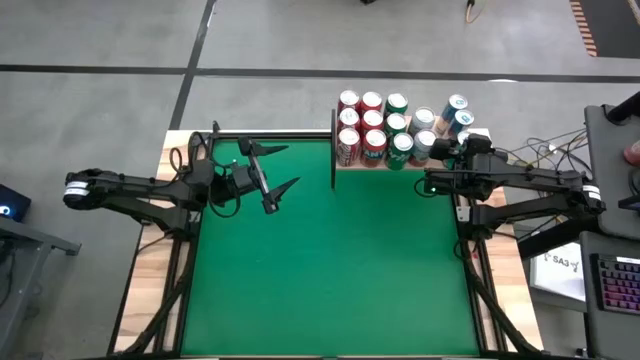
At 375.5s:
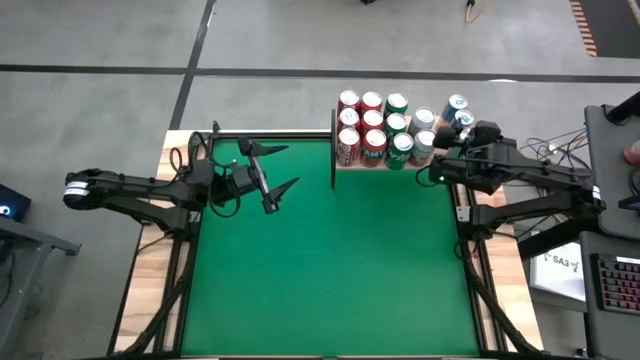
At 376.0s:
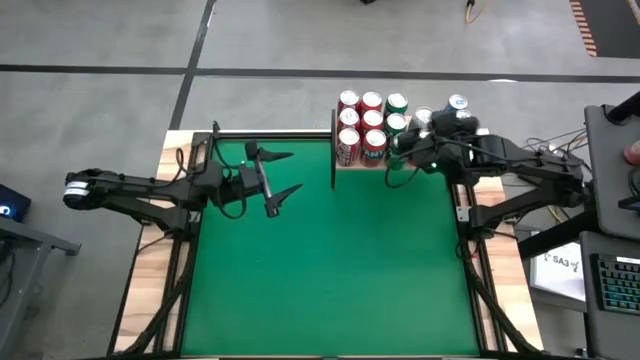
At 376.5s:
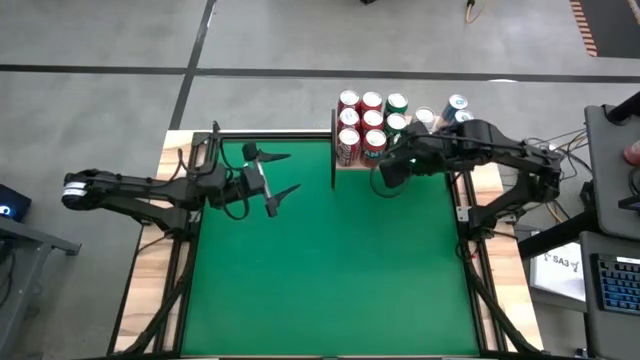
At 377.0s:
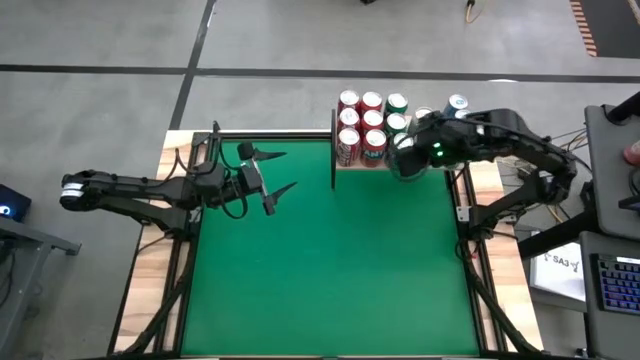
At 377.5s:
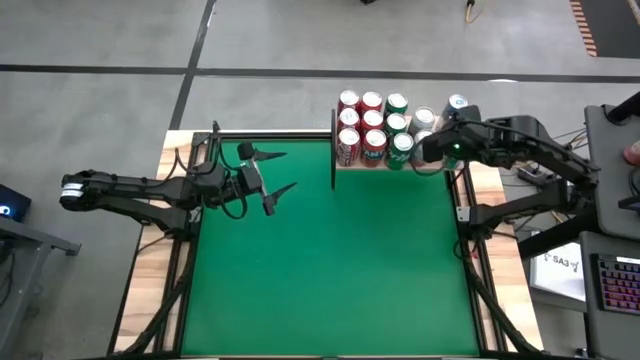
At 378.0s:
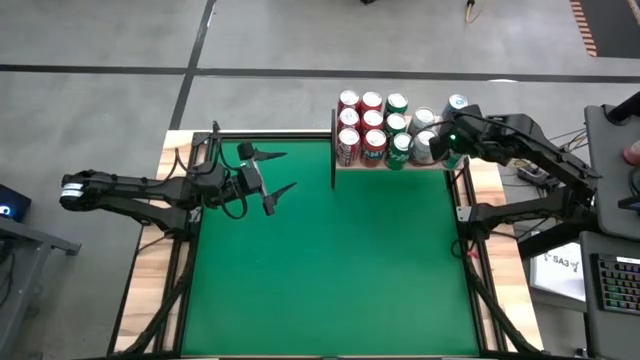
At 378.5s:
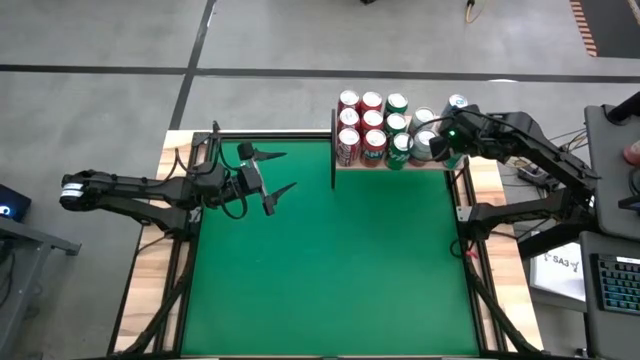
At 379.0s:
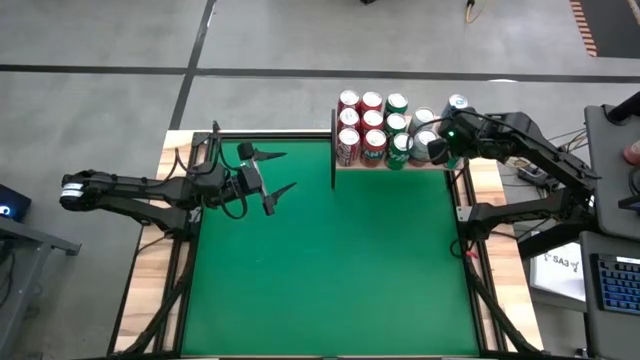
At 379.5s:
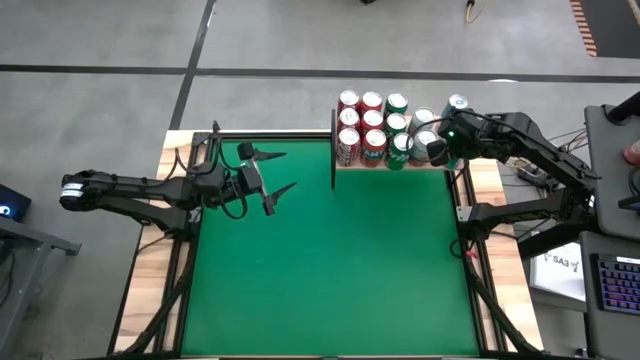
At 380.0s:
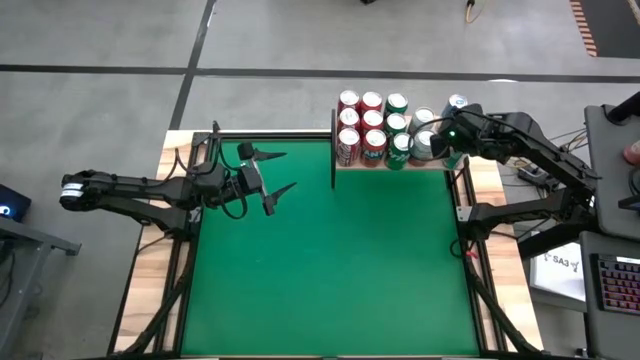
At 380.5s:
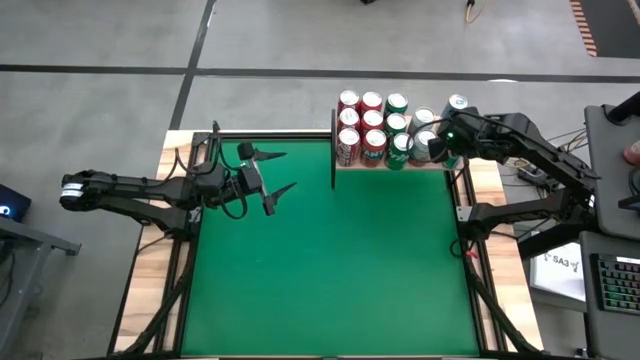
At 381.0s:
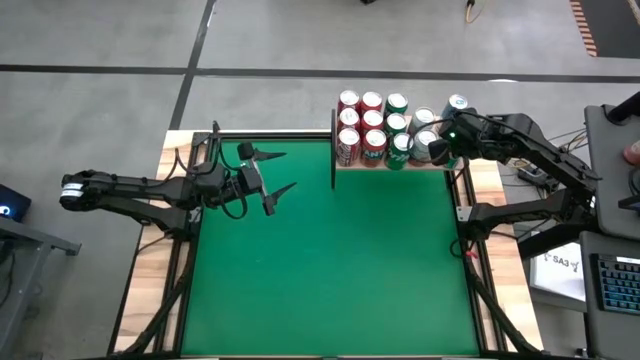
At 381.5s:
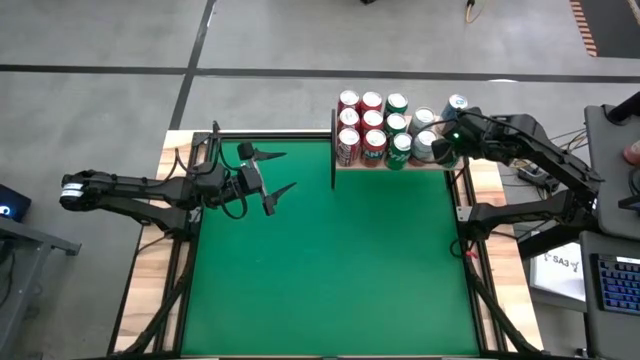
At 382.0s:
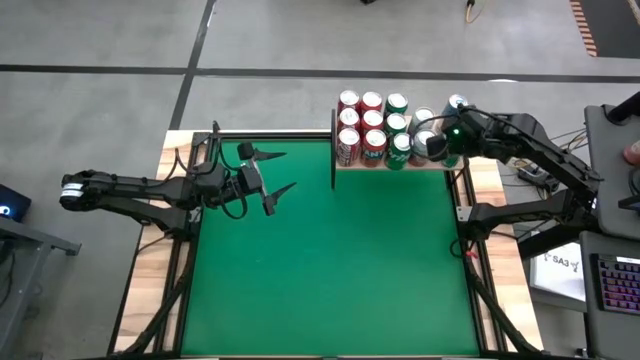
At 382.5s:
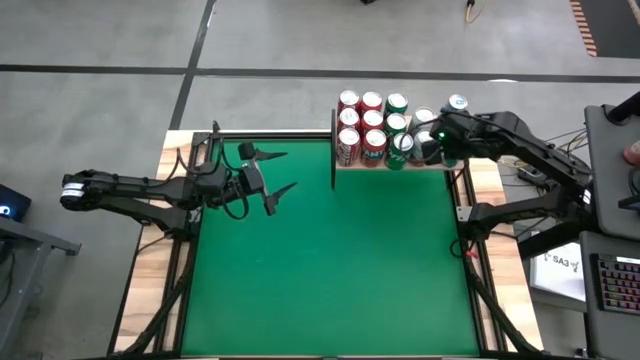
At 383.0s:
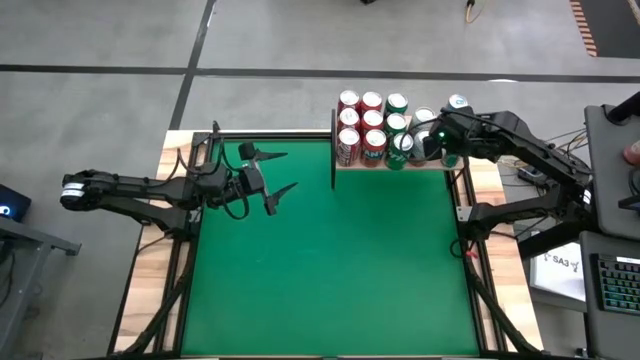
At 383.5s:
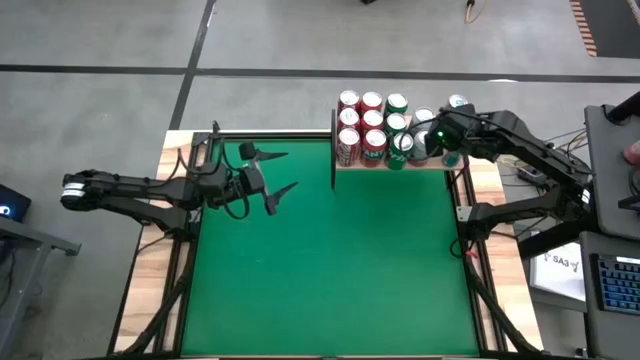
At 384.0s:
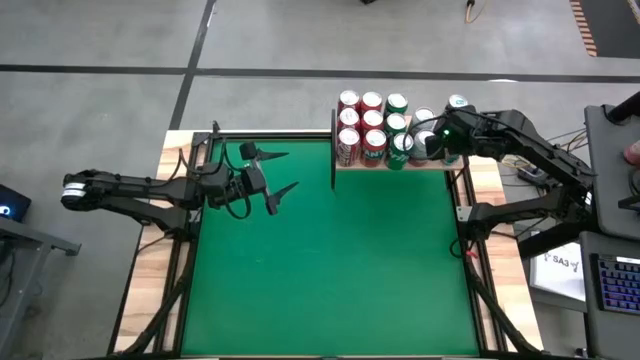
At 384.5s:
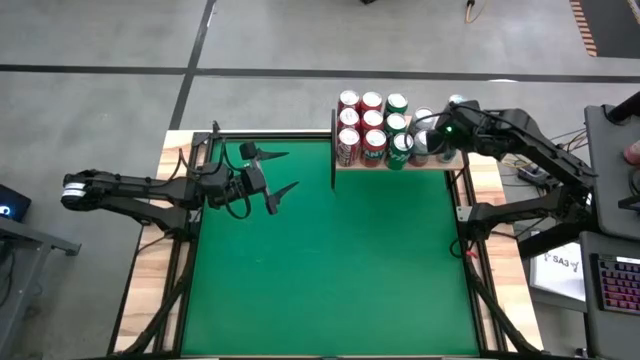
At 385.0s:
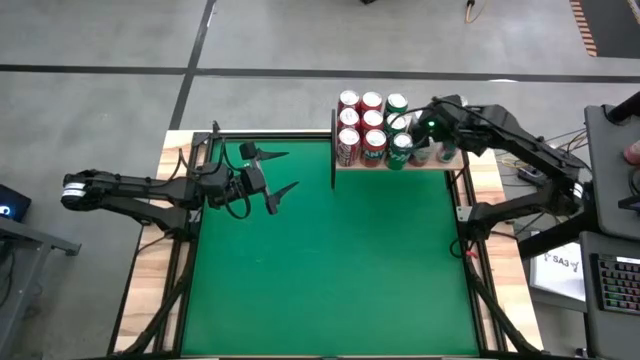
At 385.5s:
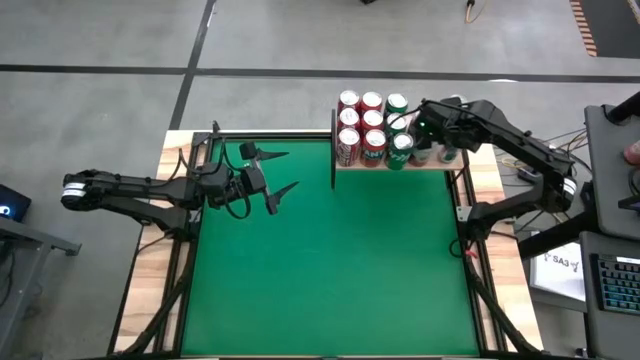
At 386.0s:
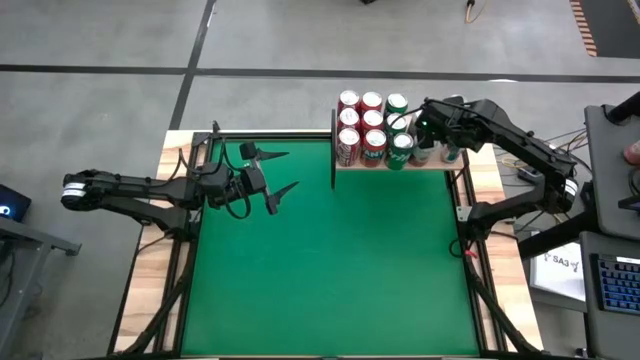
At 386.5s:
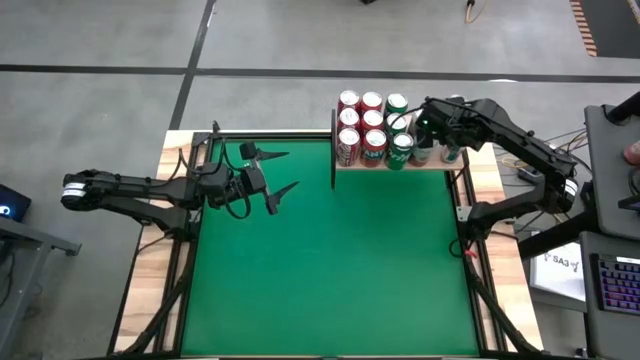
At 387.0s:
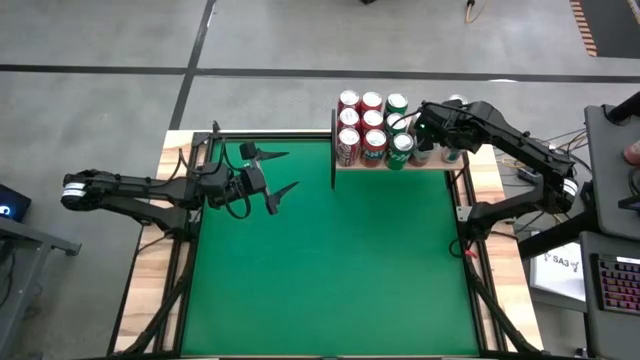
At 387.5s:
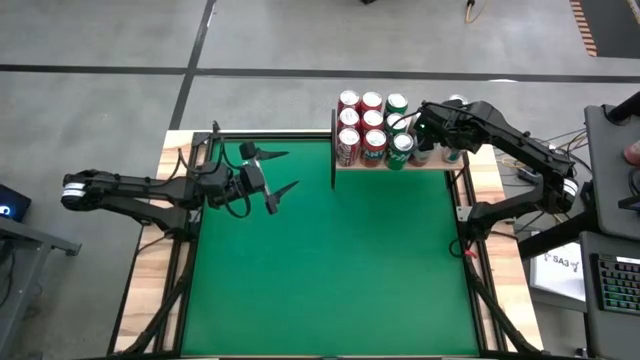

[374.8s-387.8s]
Task: Place canned beverage on shelf
Put the blue soda can on the shelf aligned with the other blue soda cans

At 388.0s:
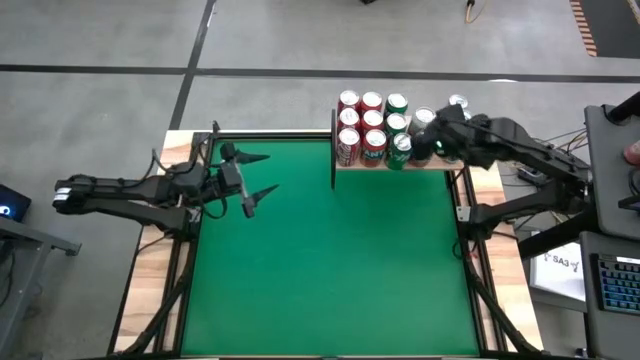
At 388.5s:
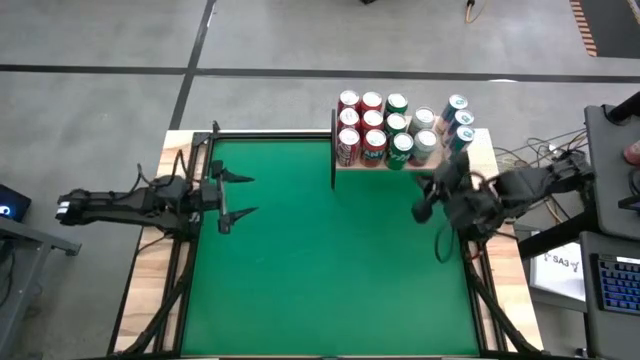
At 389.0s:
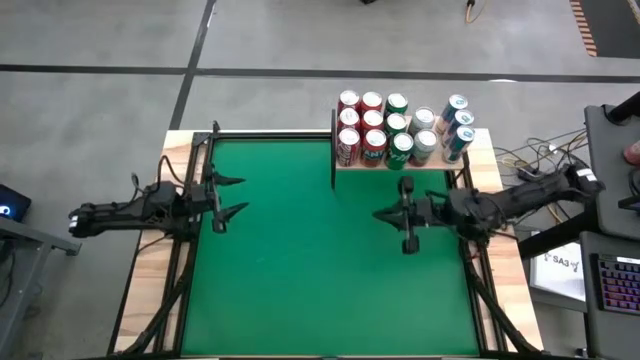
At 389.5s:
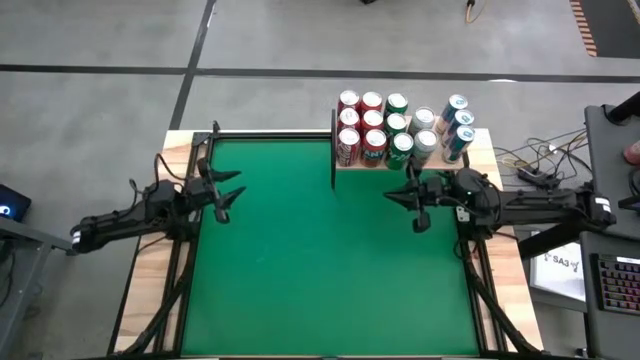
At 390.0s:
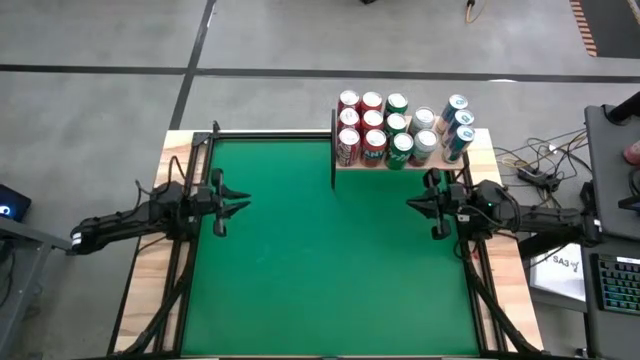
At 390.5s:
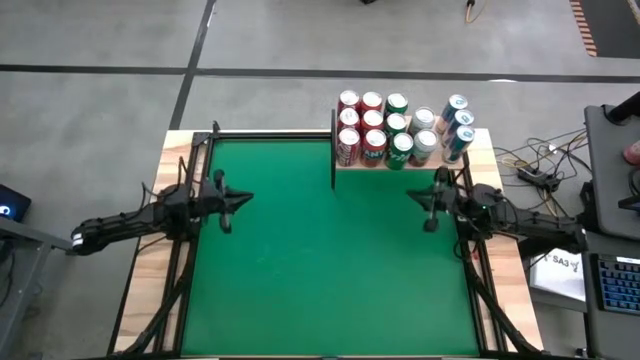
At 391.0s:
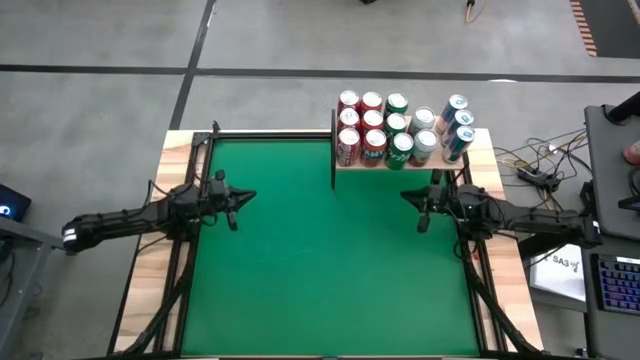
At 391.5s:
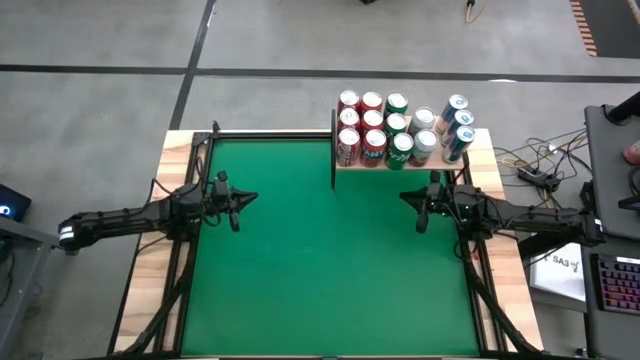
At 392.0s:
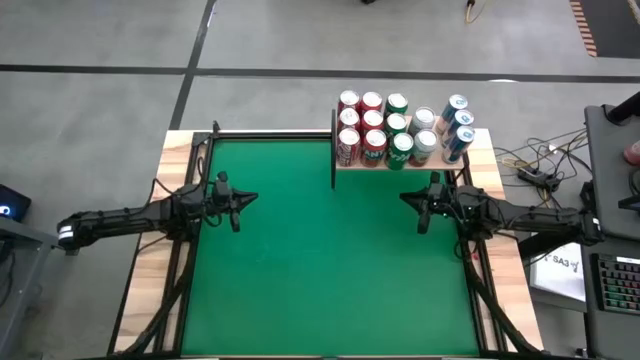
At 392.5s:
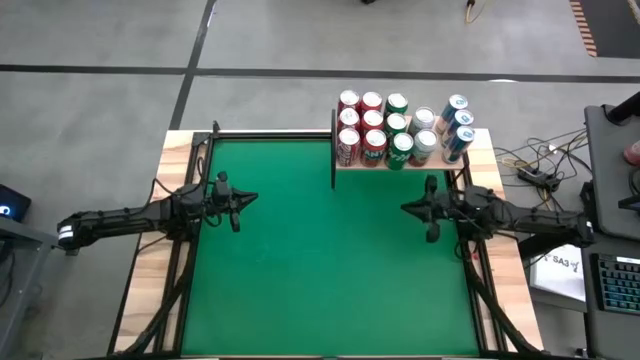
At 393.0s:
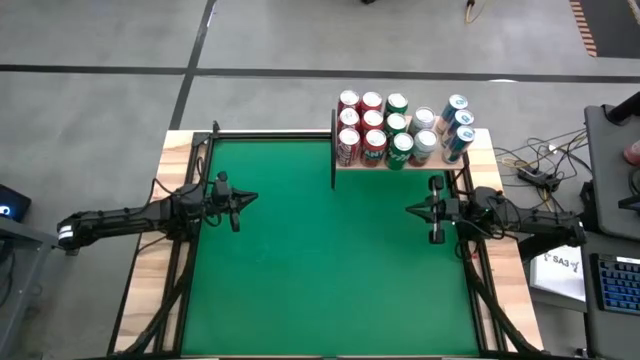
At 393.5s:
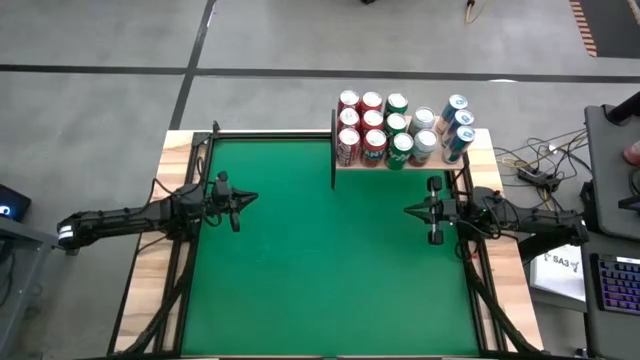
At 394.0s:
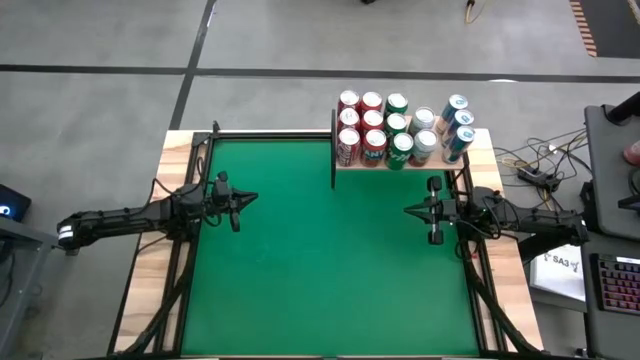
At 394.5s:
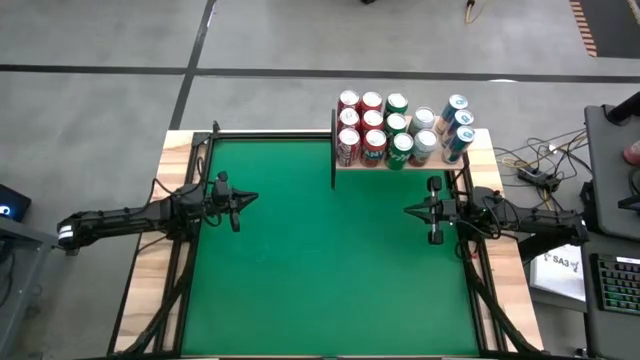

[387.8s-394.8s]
Return to Home Position

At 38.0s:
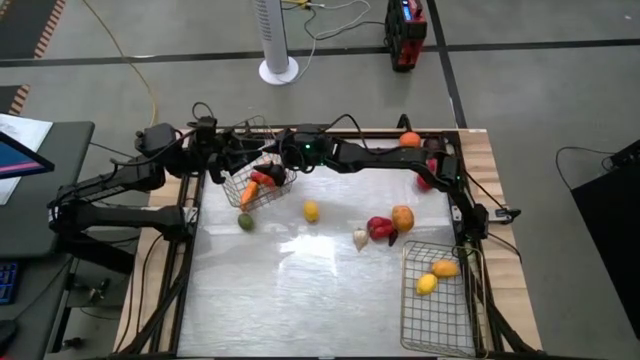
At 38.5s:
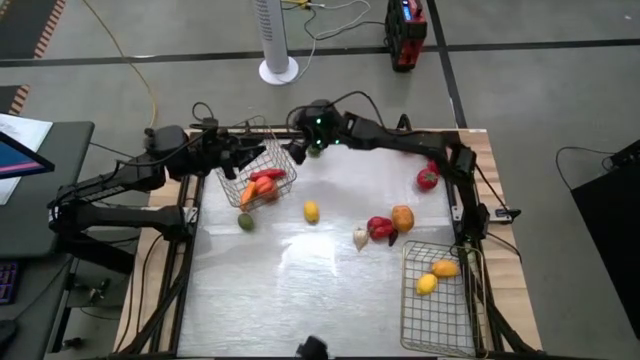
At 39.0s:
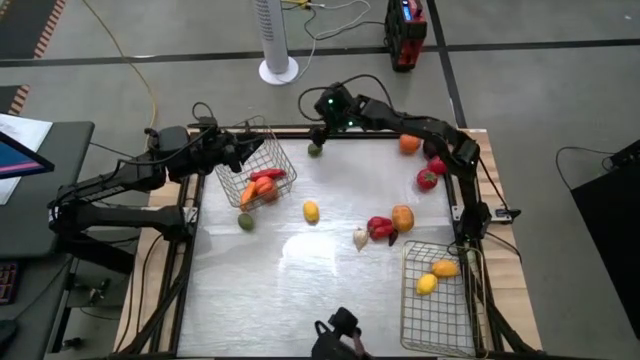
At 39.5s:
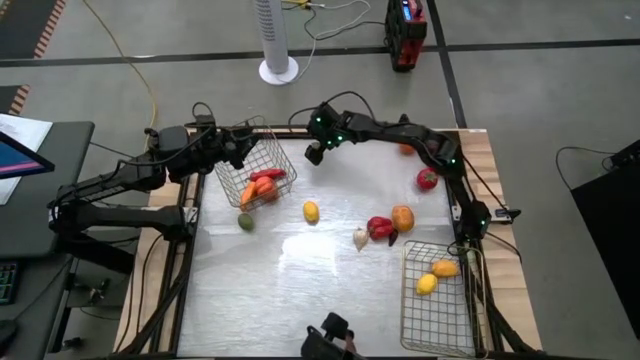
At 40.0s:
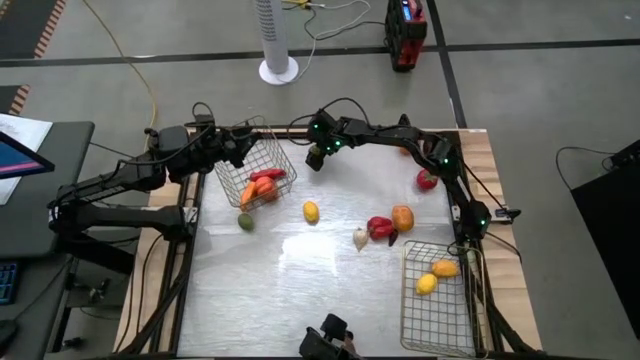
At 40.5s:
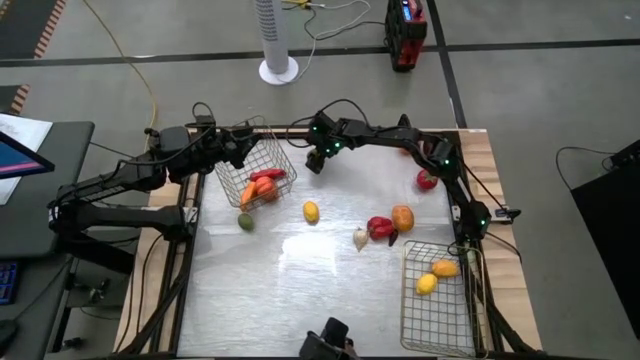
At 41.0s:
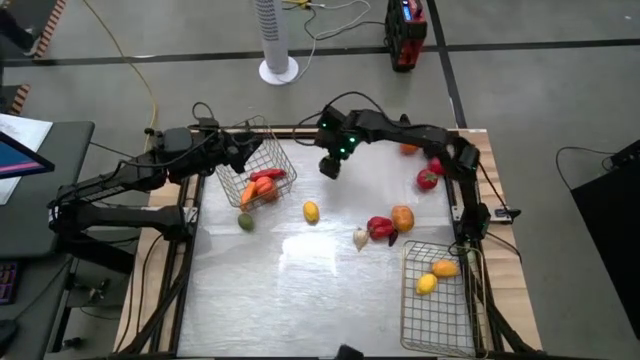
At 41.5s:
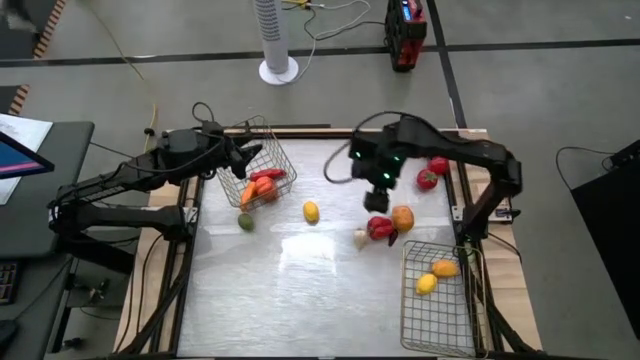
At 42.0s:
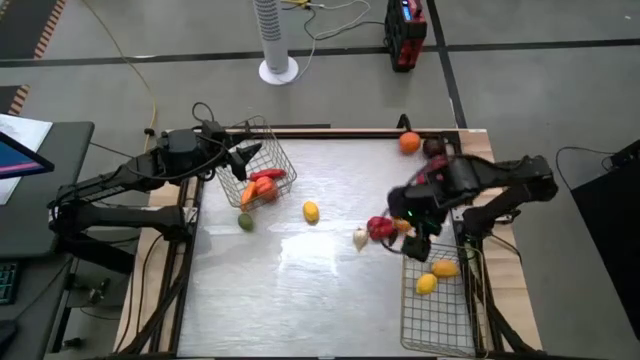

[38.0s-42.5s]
Task: Sort produce into baskets
Put the top lime into the bottom wire basket
